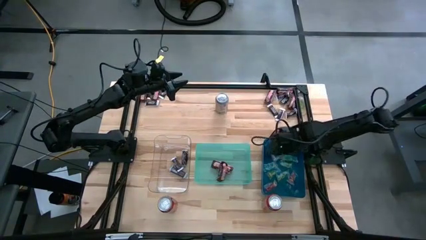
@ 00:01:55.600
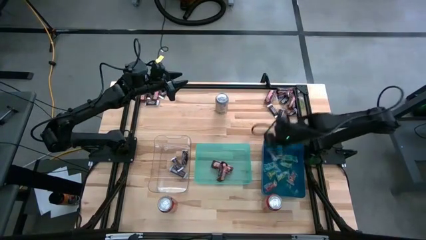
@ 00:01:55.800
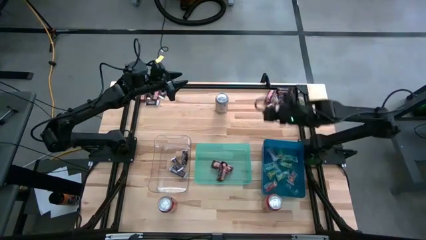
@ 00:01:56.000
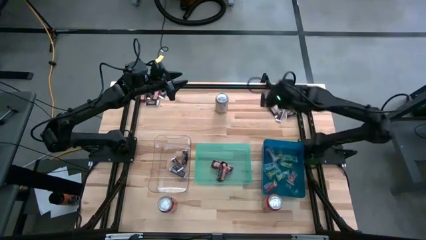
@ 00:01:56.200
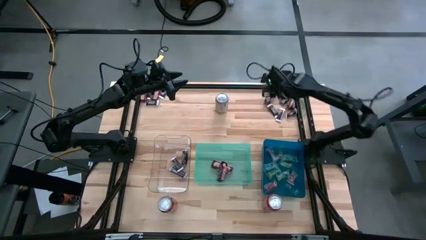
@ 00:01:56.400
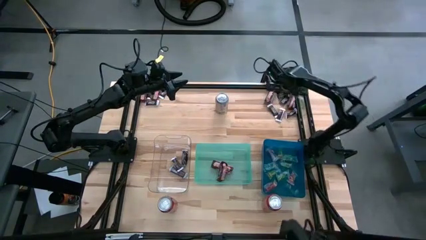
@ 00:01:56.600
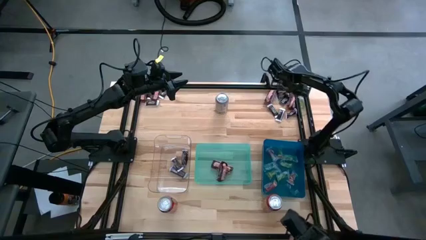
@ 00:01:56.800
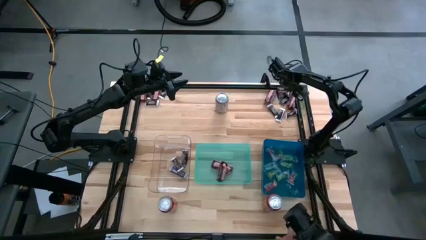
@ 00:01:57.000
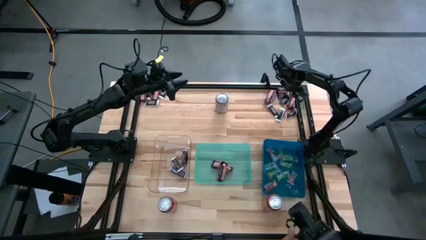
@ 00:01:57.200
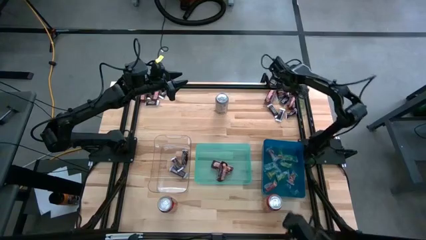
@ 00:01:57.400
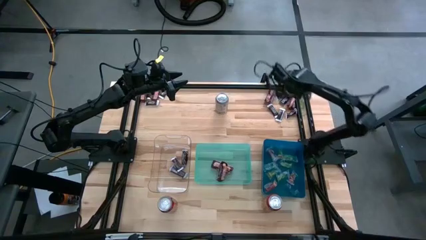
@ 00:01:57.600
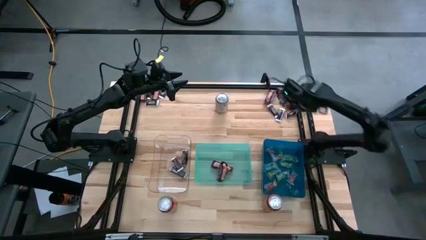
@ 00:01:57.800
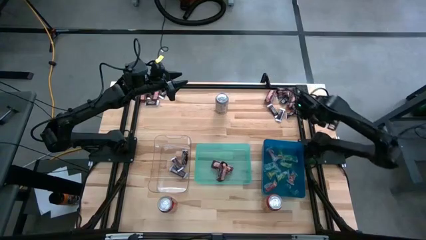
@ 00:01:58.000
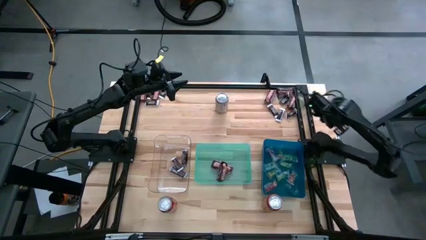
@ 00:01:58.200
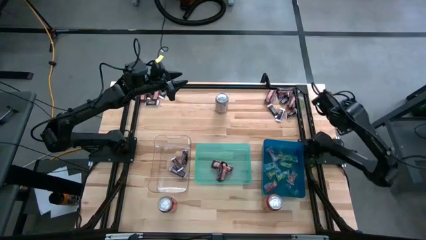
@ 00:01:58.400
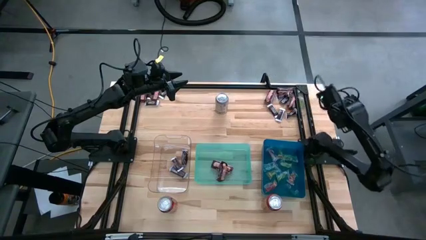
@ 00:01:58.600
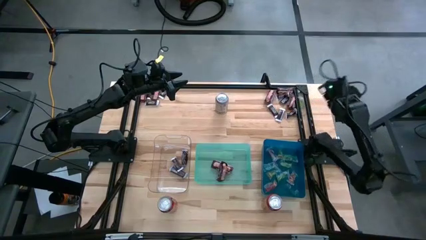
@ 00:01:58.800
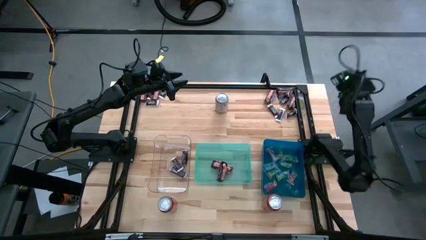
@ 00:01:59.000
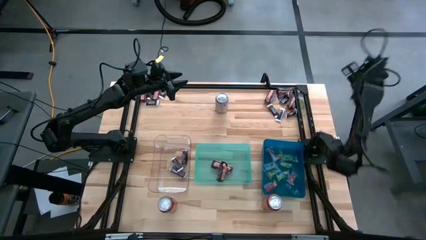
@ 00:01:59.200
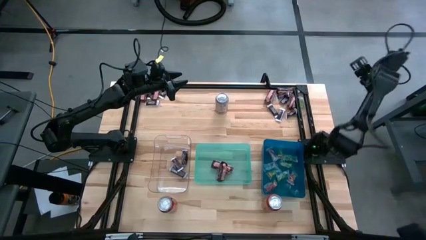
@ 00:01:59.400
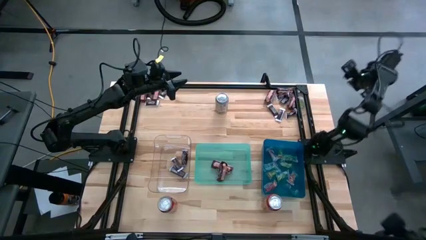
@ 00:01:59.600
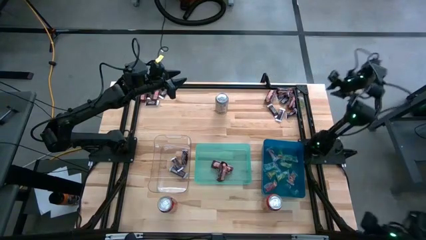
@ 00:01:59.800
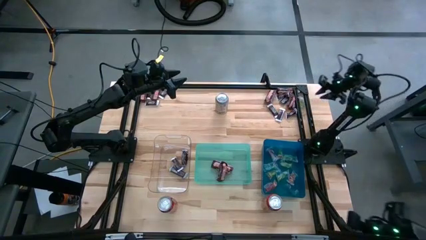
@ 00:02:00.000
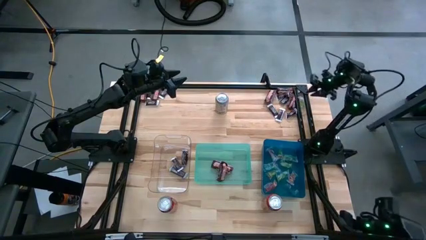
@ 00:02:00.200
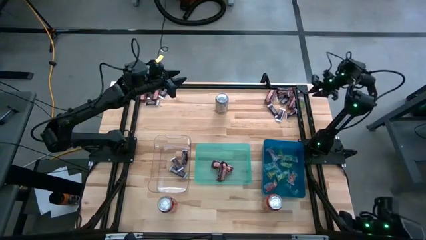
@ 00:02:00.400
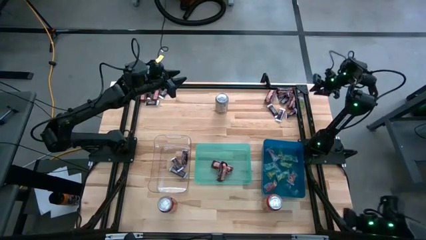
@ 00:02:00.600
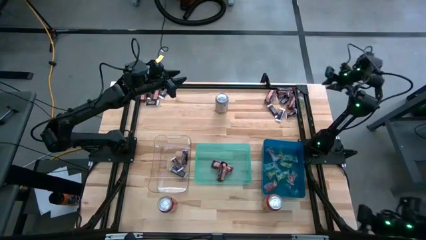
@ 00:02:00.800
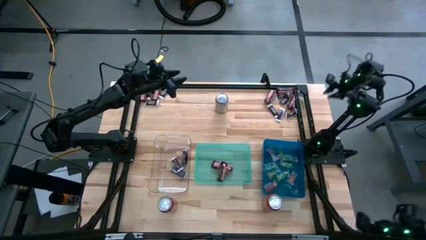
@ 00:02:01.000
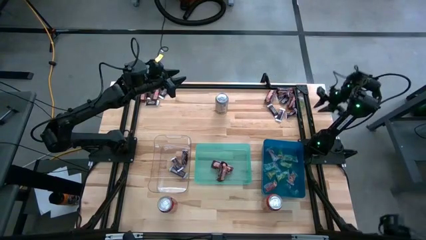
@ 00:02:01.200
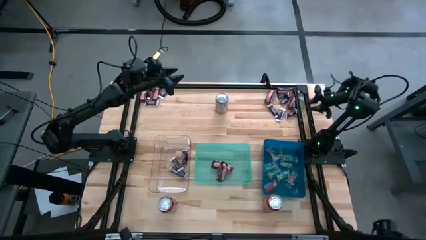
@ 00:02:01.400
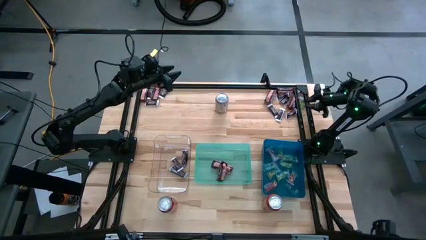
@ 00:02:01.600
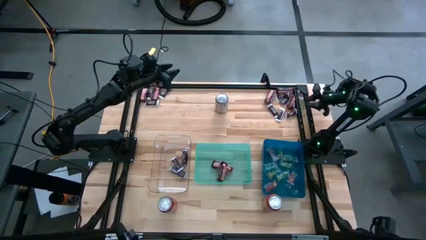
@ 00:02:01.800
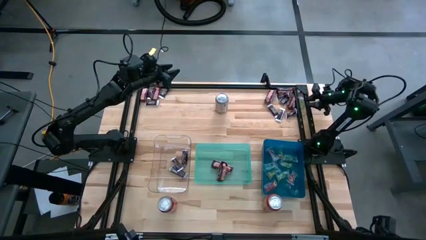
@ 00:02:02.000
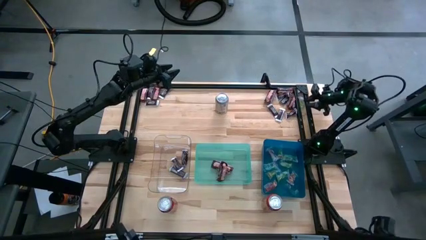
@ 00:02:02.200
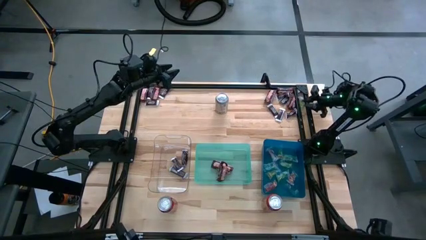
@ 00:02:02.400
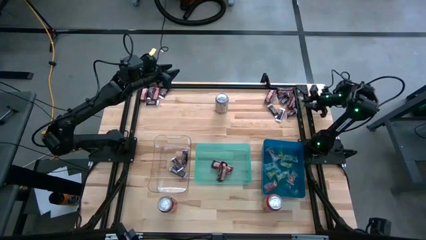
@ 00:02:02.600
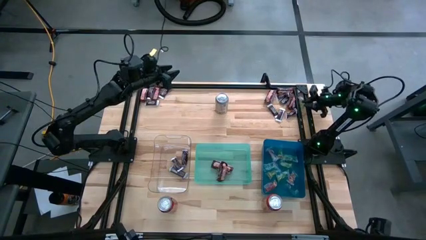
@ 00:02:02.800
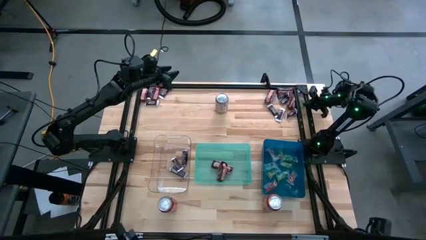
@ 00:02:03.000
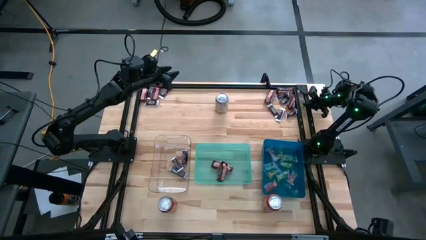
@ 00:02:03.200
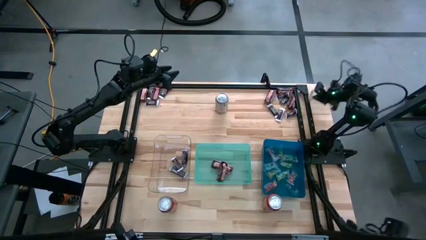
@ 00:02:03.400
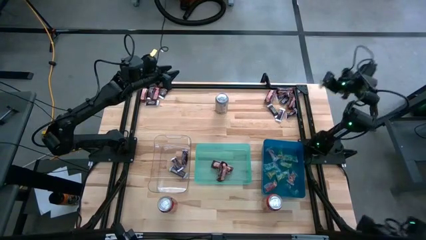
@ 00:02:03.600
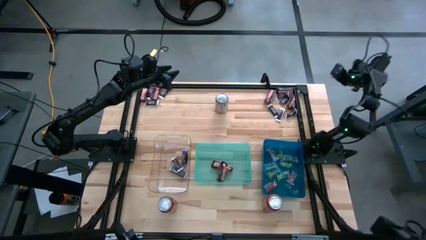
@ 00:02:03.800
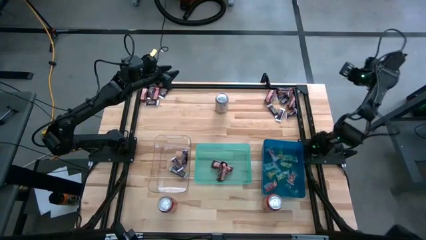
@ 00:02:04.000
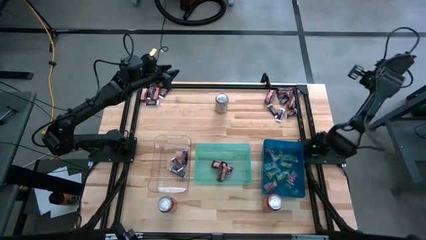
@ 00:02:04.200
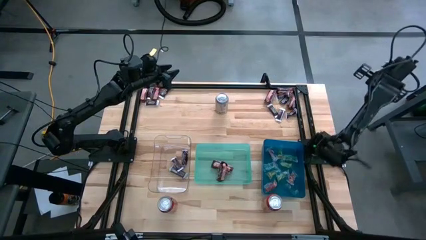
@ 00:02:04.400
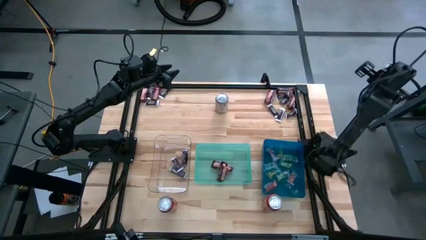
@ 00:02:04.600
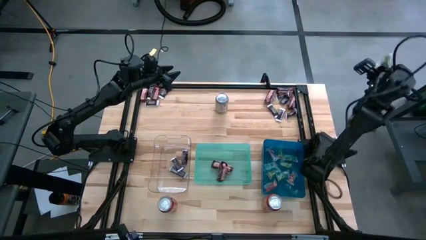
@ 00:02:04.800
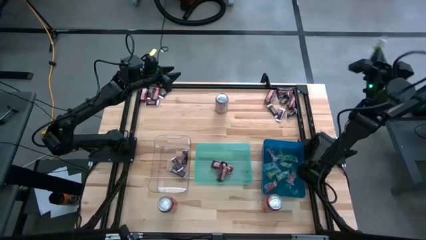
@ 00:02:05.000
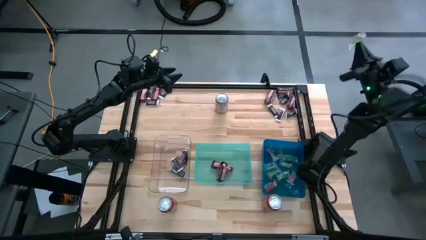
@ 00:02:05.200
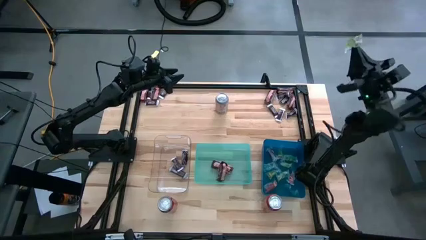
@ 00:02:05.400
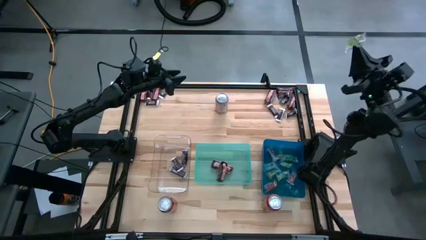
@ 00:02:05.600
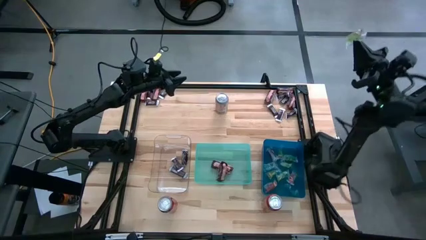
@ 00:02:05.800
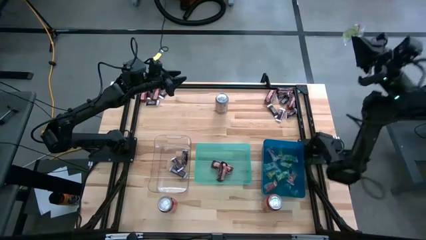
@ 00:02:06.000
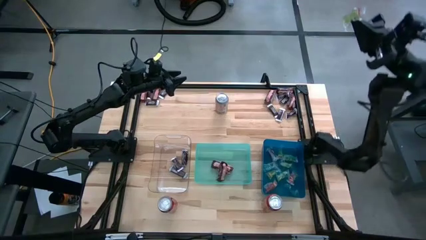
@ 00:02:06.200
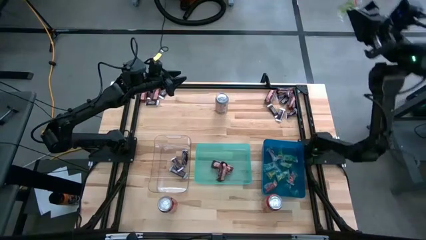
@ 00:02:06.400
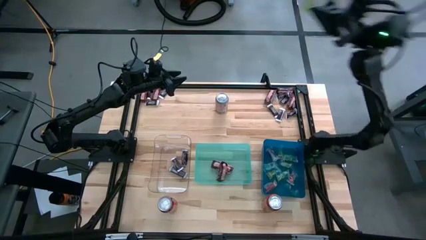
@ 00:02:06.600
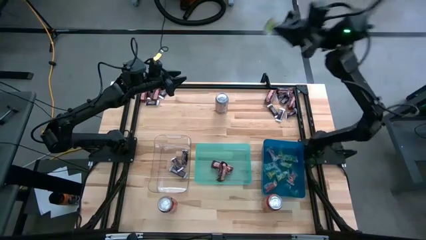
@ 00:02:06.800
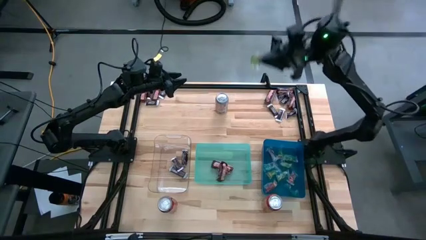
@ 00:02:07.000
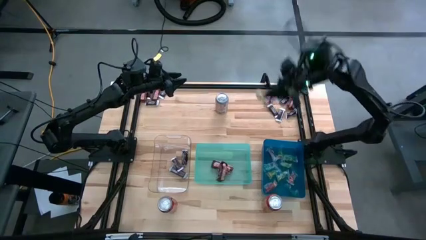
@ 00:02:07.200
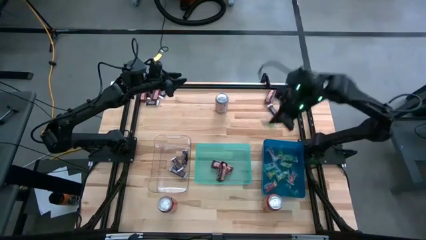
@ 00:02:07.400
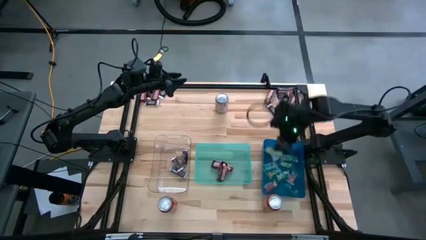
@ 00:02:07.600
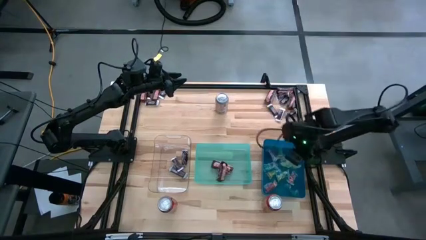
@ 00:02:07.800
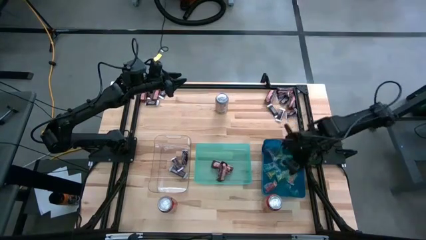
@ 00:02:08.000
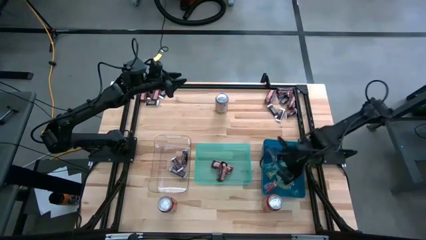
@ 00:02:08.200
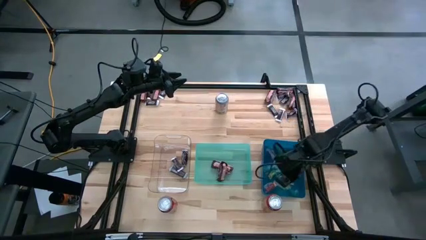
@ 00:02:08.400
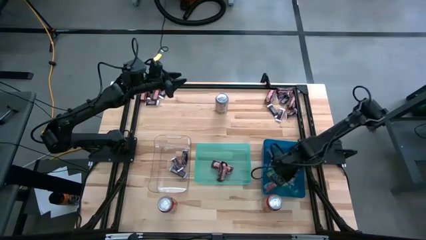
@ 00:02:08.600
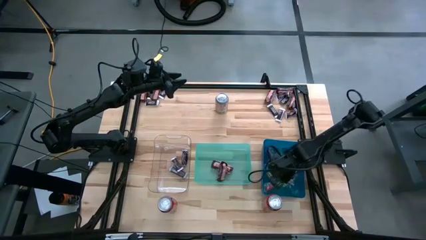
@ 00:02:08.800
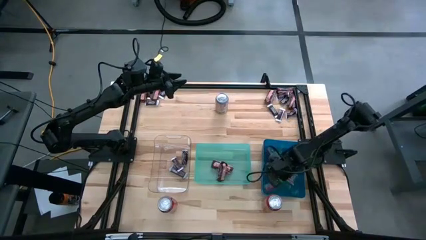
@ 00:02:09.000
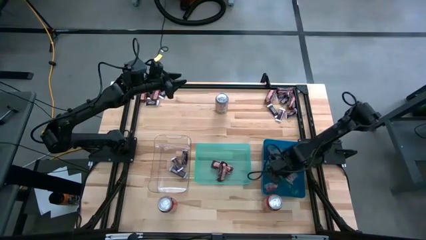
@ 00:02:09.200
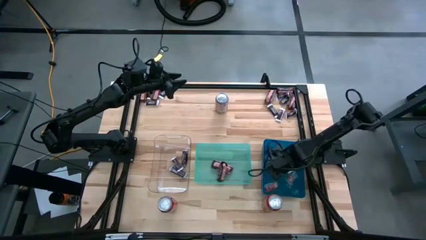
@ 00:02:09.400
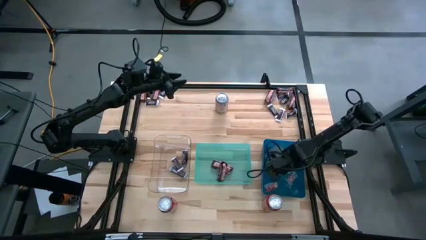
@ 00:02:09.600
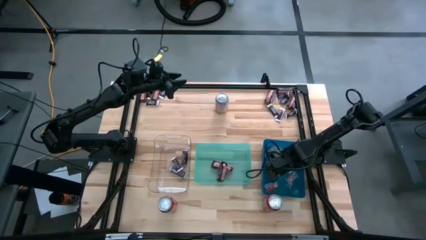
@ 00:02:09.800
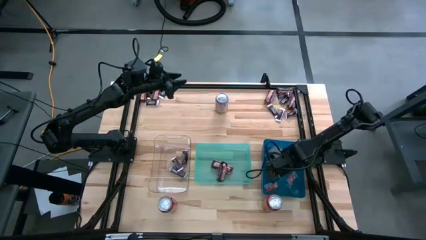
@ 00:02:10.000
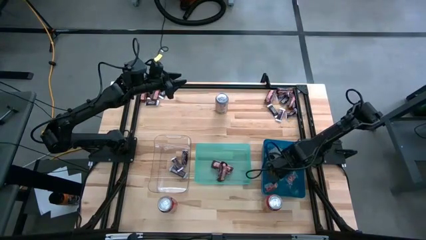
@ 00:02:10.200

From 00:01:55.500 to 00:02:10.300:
Task: Organize candy in baskets
Put the green gummy into the blue bin
